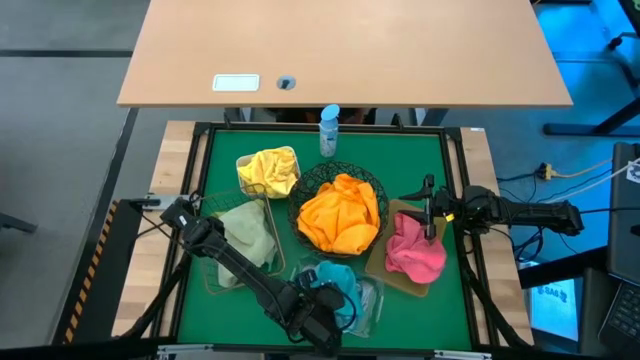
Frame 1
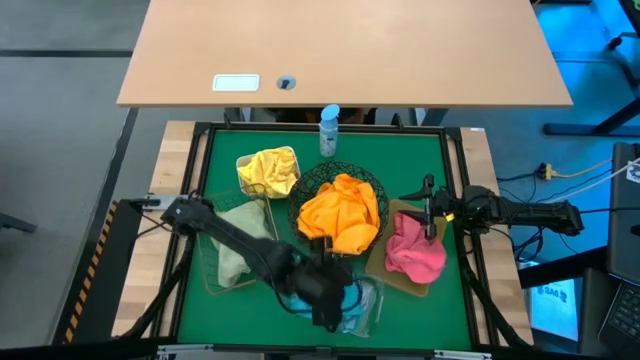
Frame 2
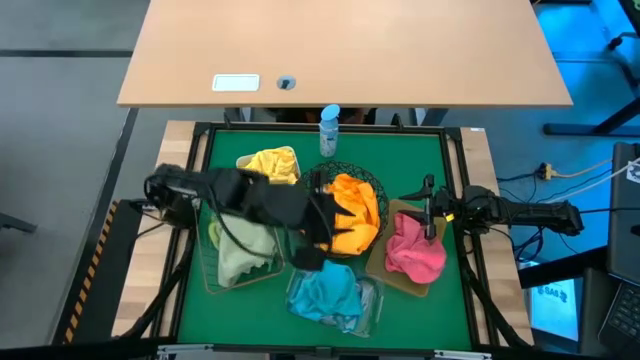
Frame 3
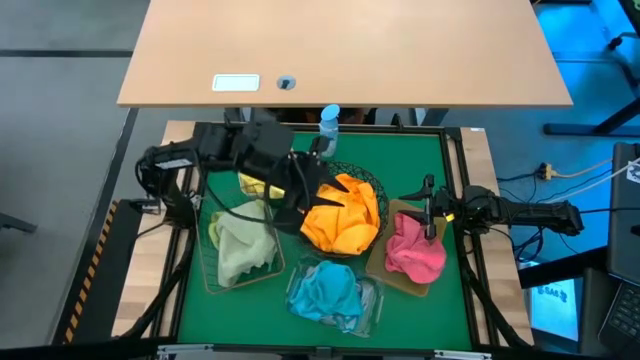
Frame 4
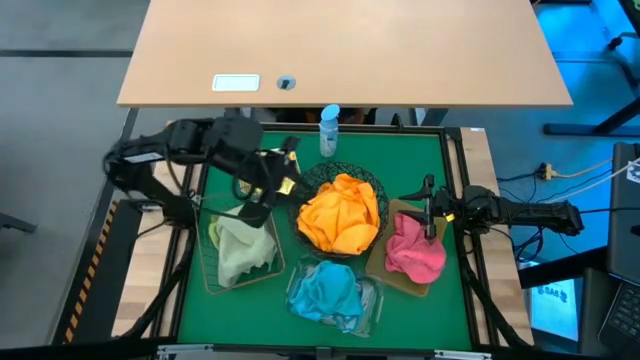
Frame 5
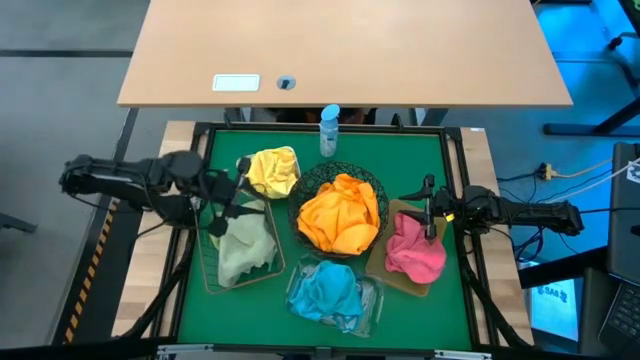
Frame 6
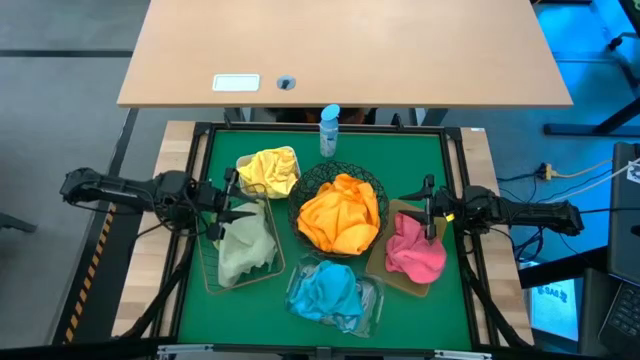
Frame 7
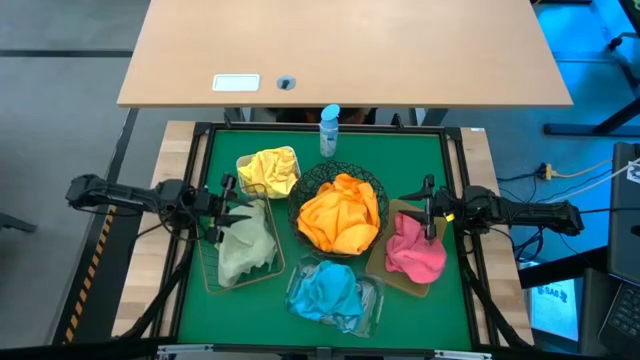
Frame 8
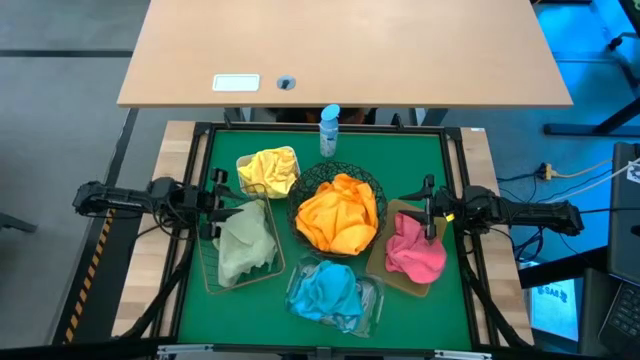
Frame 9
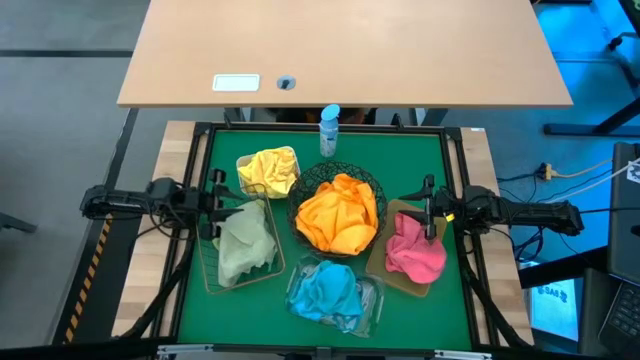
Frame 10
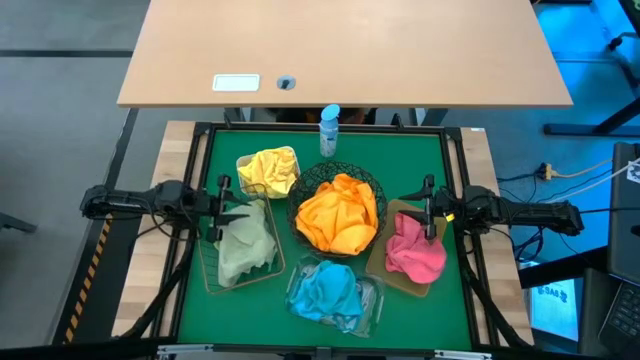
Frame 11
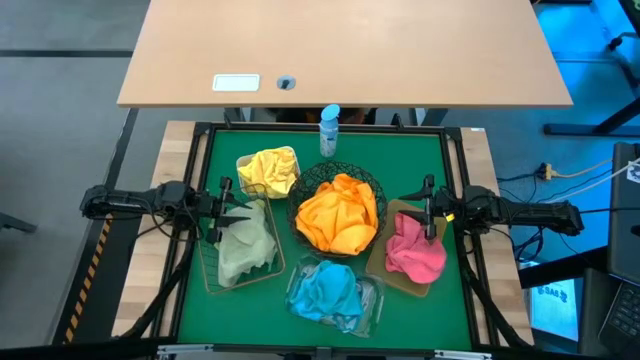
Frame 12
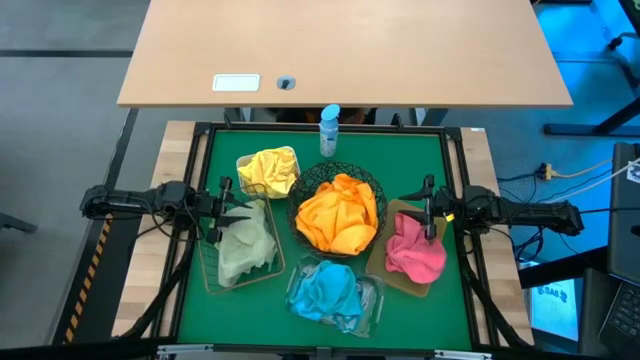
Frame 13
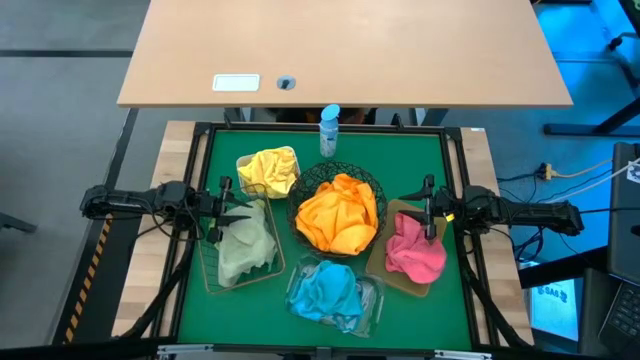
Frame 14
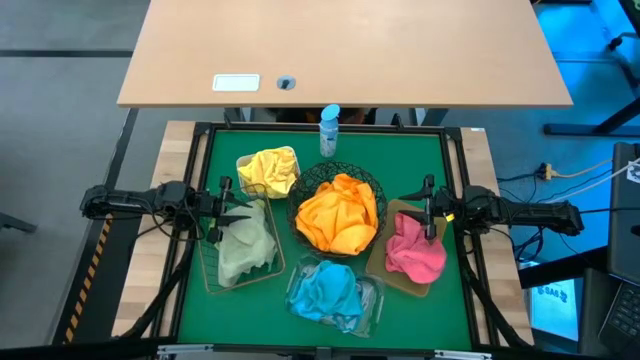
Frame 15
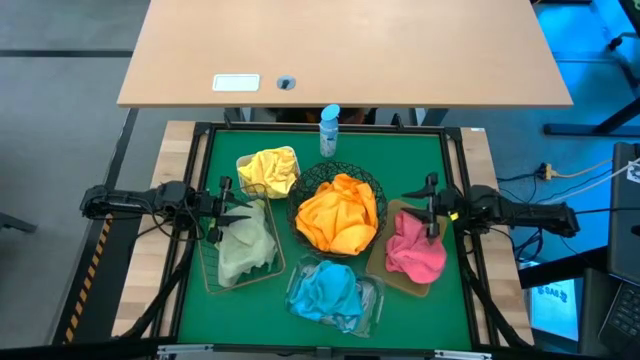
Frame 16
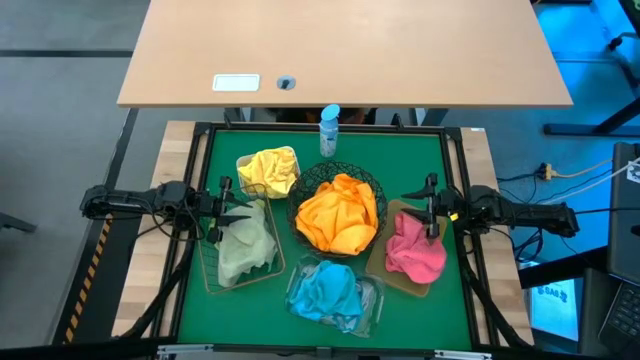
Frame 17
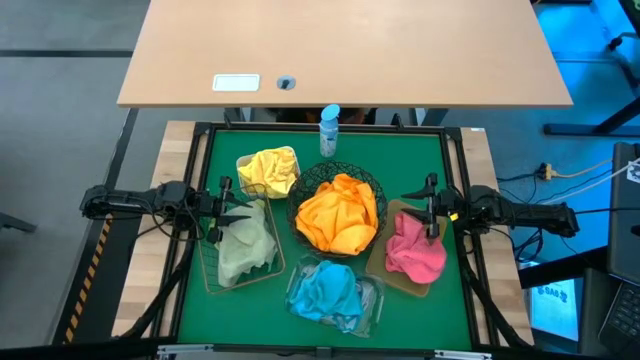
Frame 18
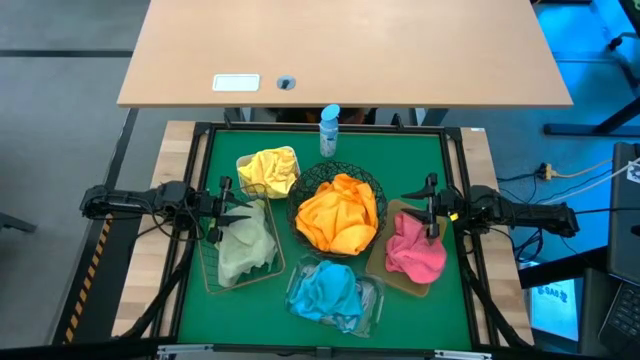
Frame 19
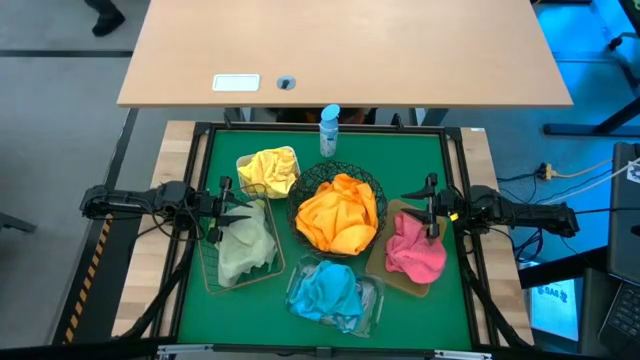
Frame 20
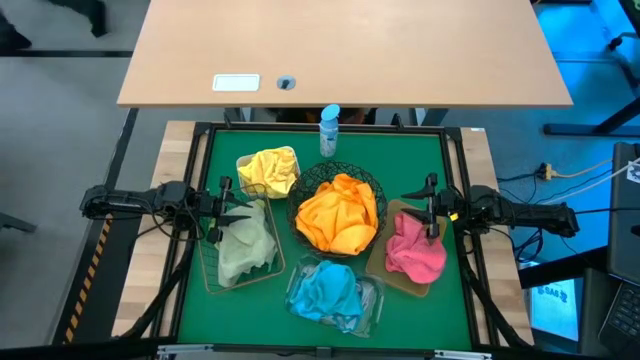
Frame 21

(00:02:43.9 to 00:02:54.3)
Task: Sort microfiber towel by color & place in baskets
Return to Home Position

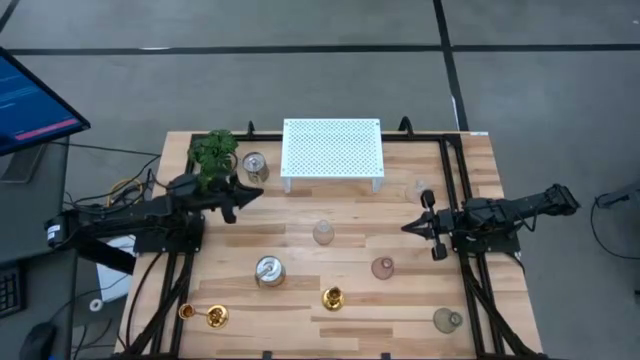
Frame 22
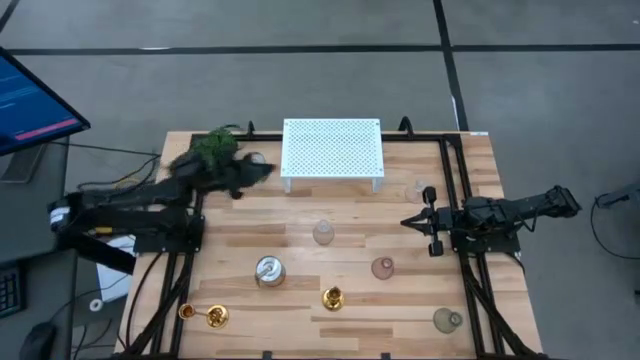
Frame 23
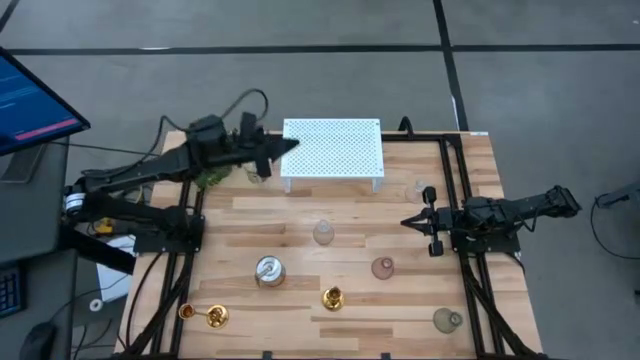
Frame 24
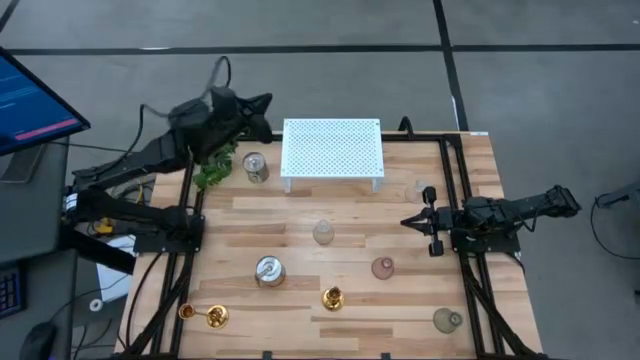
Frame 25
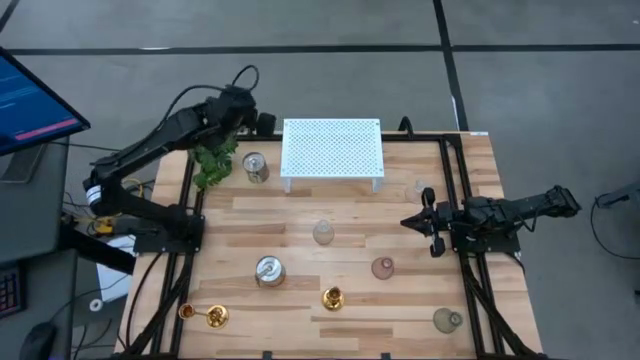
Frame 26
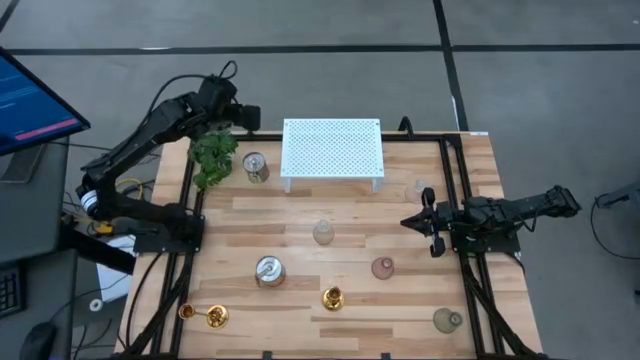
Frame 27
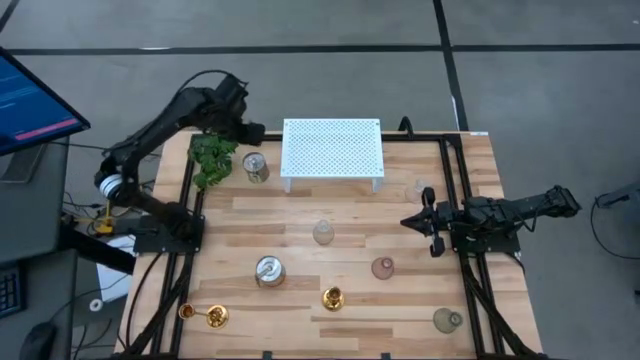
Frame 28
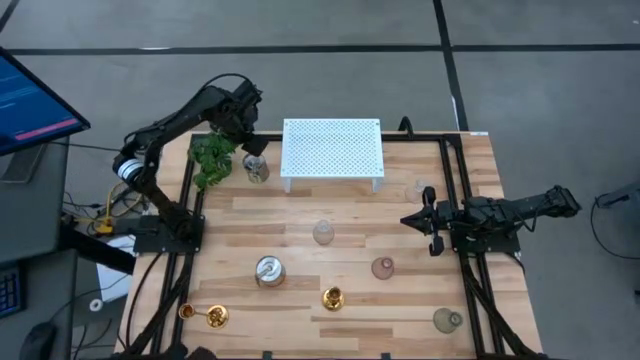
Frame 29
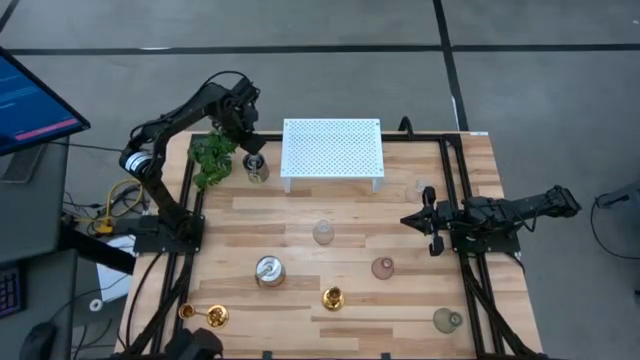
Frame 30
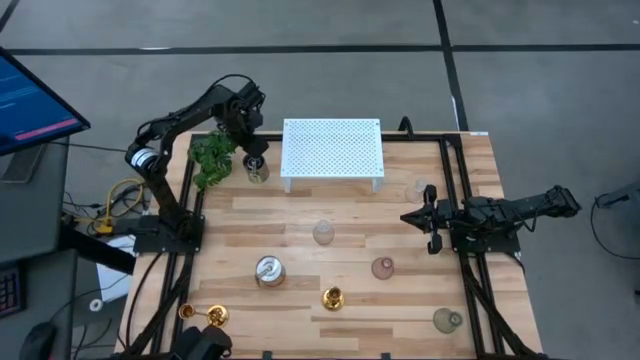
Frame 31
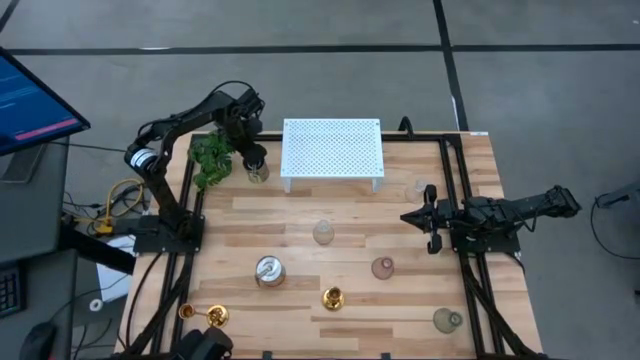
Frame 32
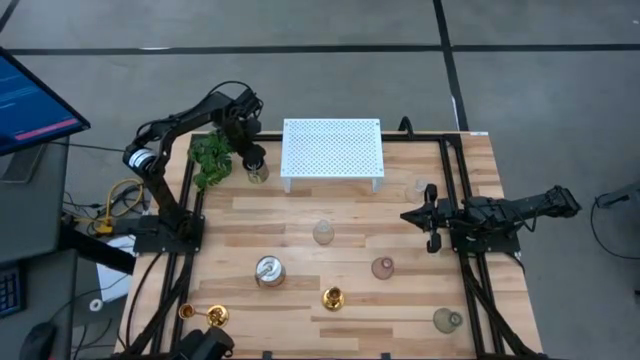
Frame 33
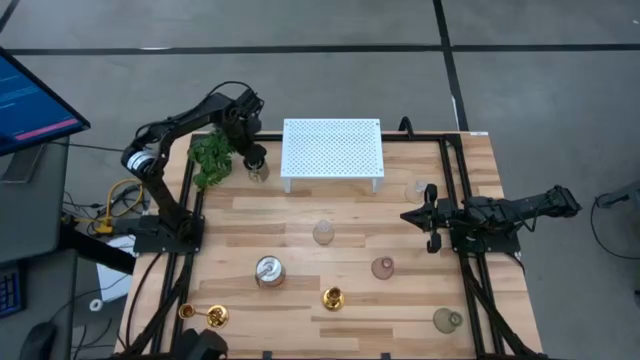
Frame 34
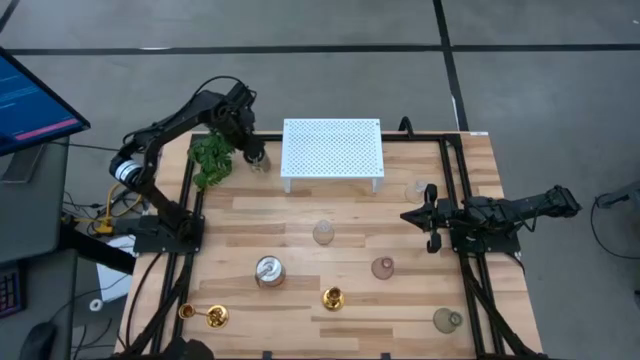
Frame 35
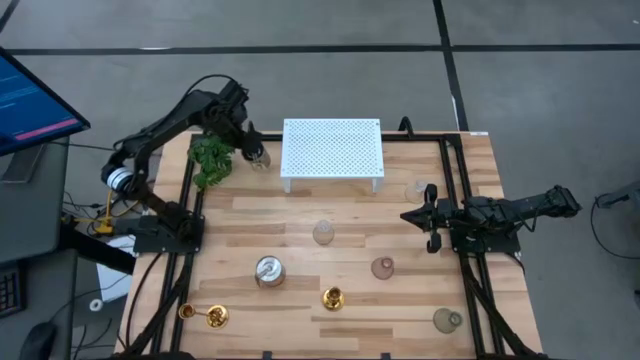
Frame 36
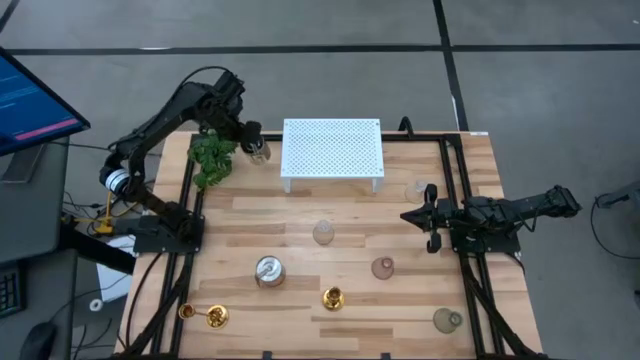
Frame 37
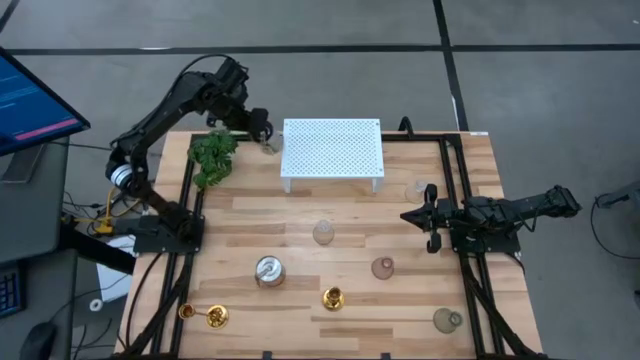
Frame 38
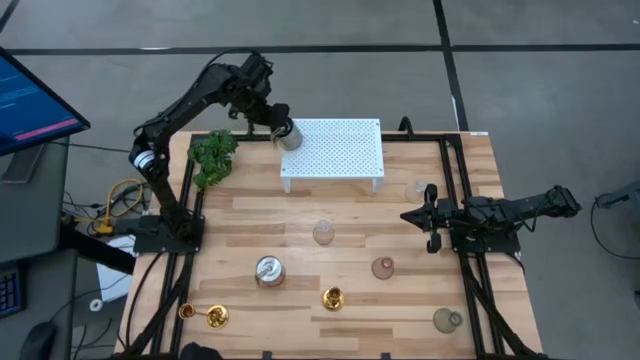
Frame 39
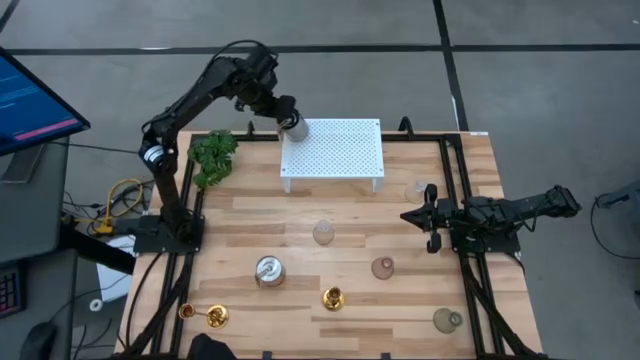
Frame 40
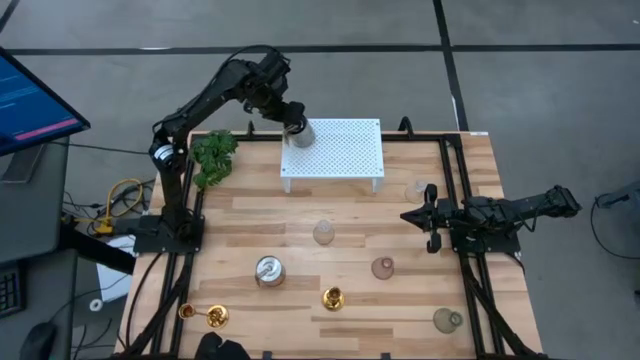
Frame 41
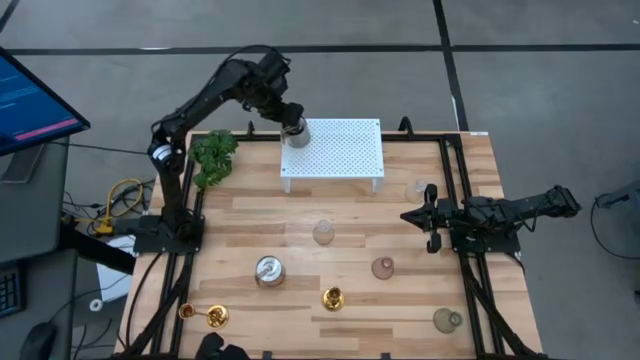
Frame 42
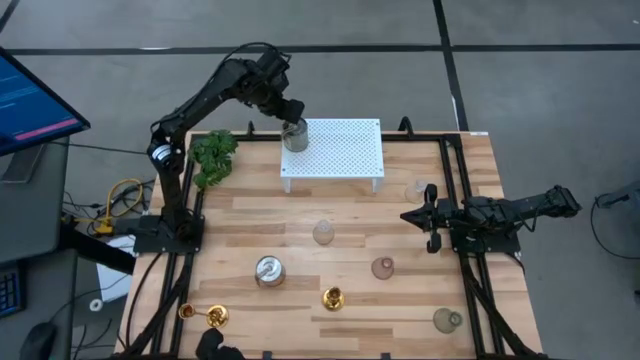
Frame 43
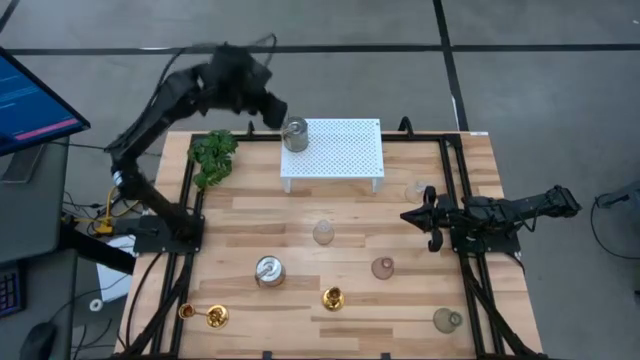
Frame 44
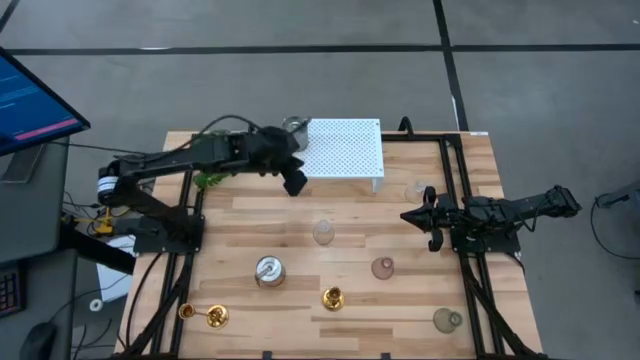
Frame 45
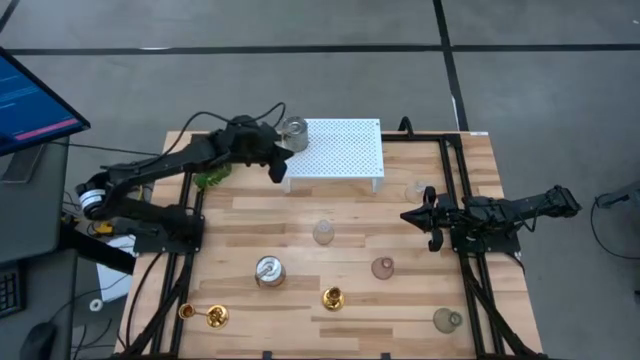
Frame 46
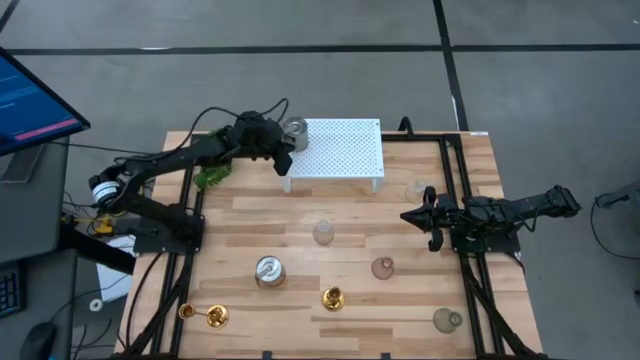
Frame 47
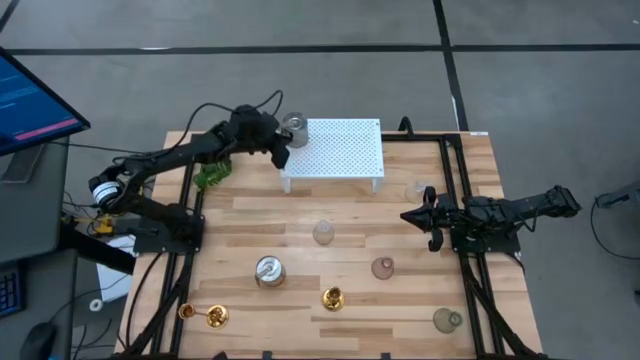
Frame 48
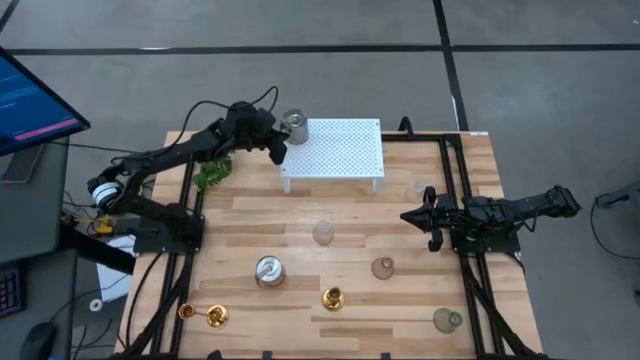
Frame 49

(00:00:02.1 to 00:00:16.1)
Task: Pick & Place candle stick holders
Put the top silver scented candle on the shelf
